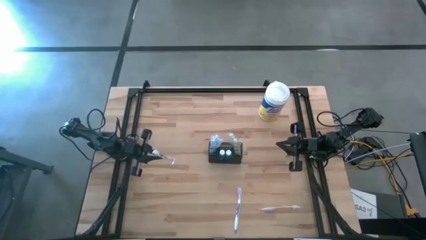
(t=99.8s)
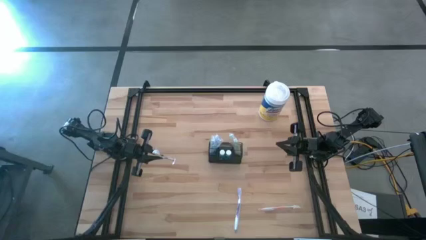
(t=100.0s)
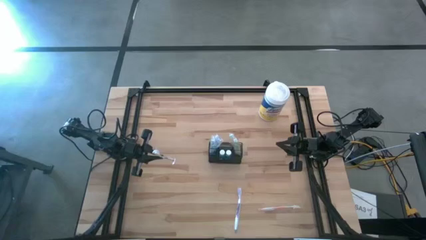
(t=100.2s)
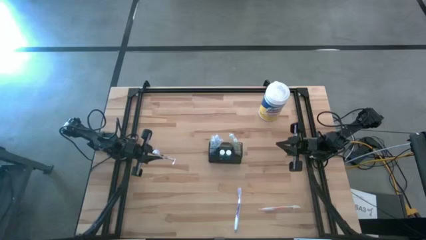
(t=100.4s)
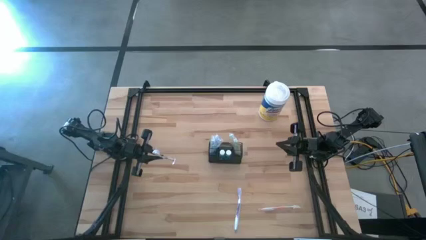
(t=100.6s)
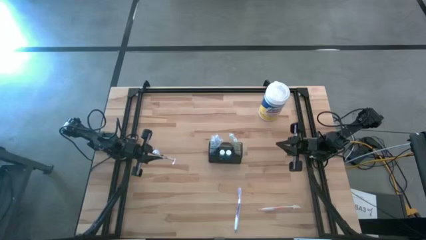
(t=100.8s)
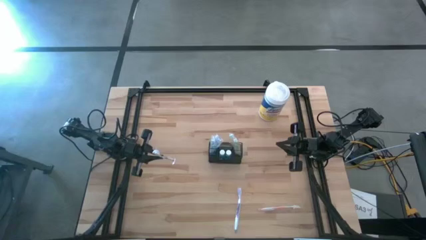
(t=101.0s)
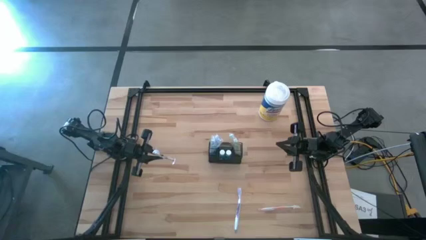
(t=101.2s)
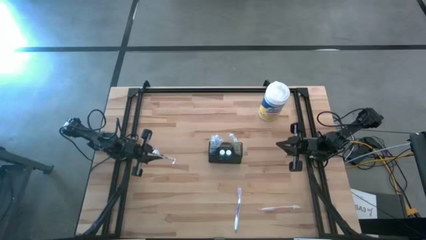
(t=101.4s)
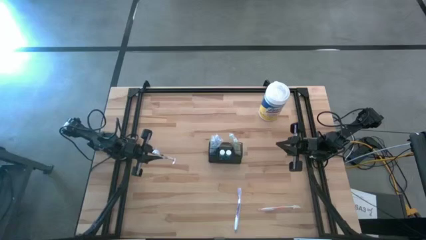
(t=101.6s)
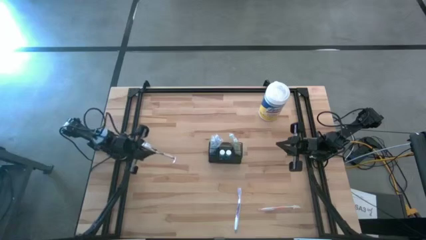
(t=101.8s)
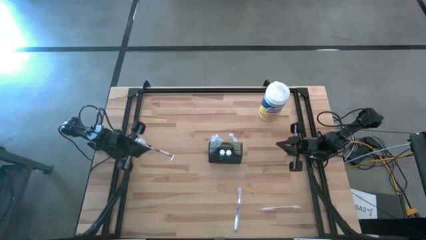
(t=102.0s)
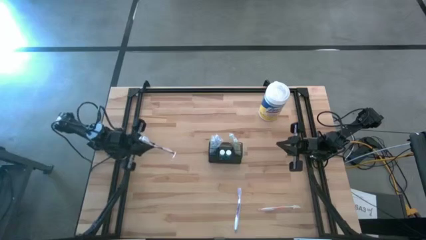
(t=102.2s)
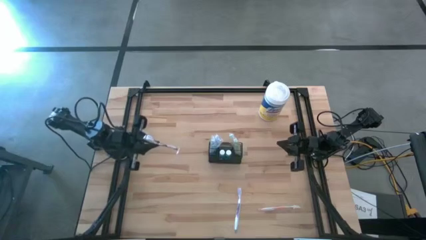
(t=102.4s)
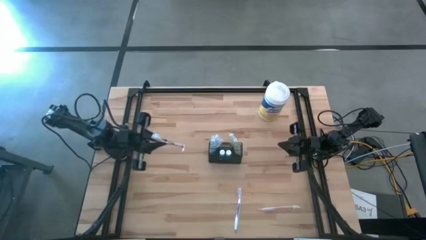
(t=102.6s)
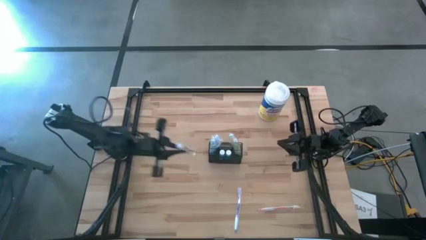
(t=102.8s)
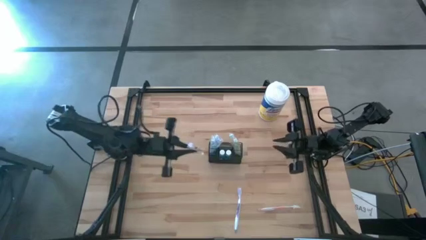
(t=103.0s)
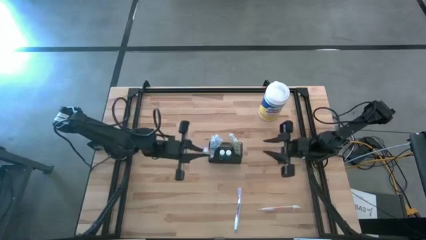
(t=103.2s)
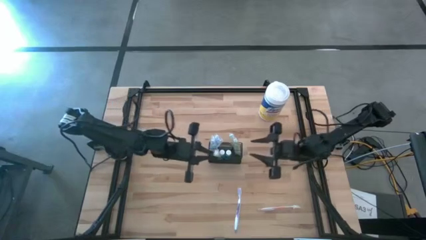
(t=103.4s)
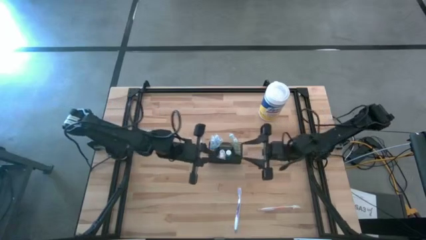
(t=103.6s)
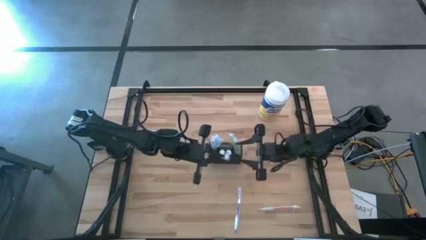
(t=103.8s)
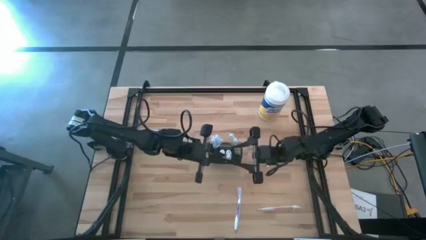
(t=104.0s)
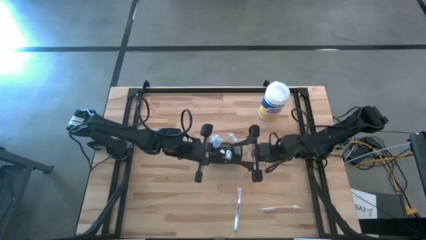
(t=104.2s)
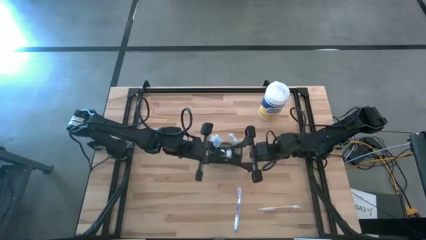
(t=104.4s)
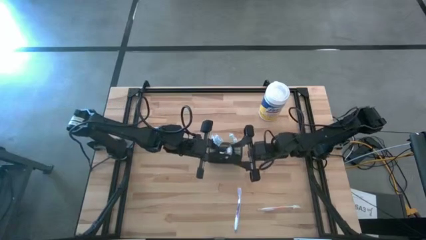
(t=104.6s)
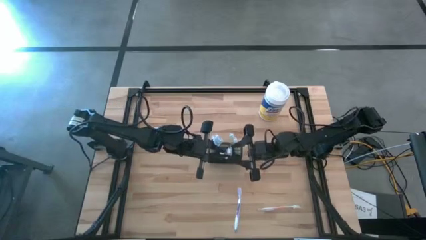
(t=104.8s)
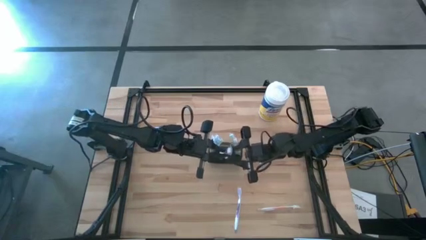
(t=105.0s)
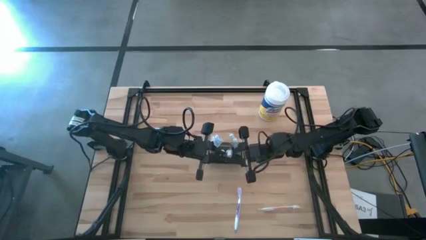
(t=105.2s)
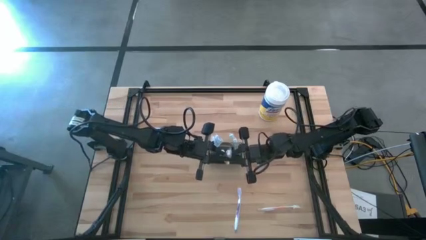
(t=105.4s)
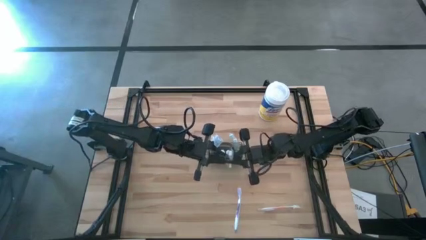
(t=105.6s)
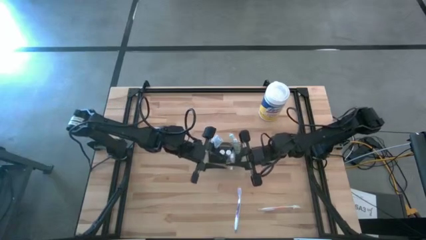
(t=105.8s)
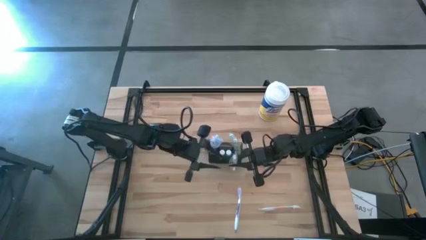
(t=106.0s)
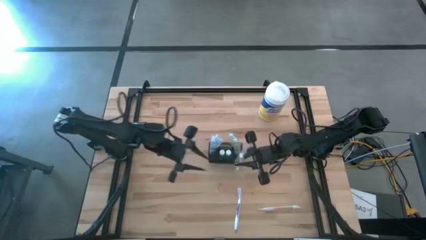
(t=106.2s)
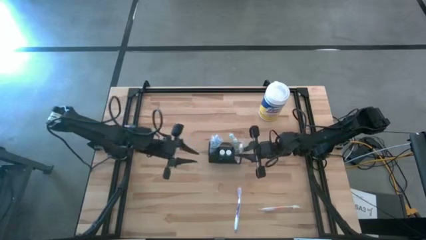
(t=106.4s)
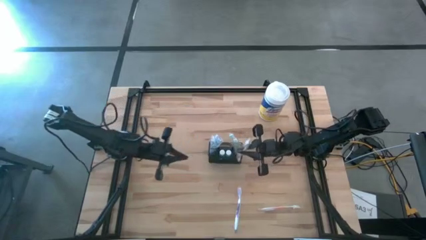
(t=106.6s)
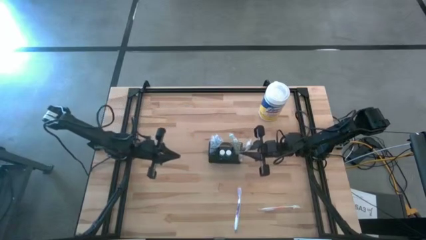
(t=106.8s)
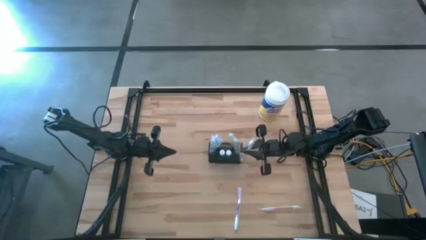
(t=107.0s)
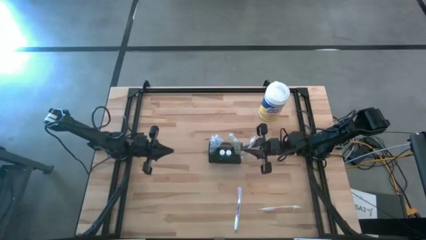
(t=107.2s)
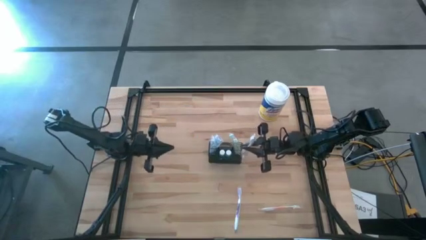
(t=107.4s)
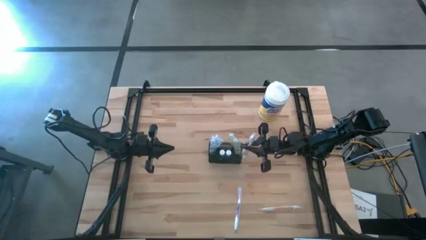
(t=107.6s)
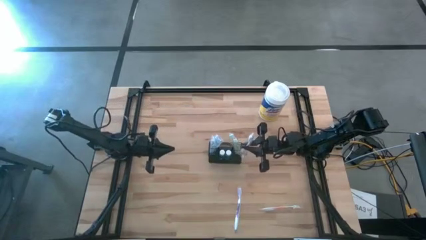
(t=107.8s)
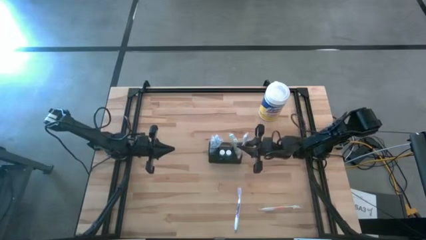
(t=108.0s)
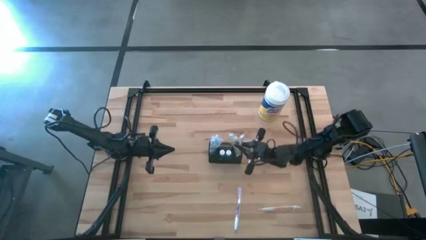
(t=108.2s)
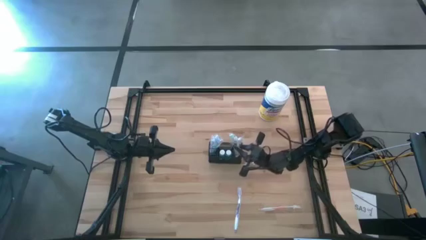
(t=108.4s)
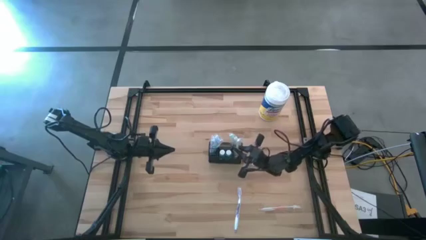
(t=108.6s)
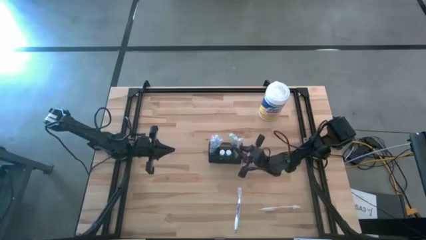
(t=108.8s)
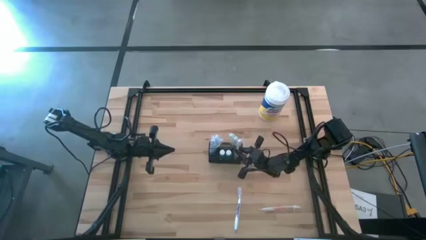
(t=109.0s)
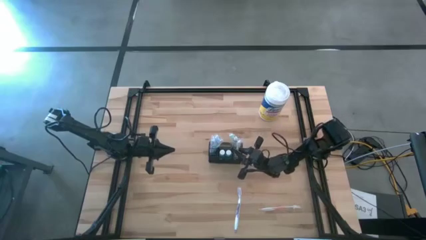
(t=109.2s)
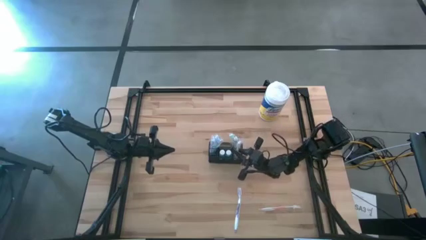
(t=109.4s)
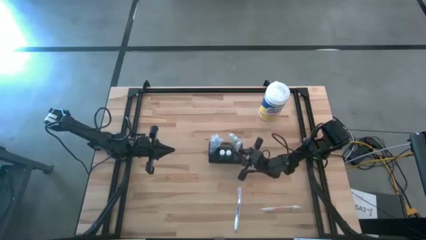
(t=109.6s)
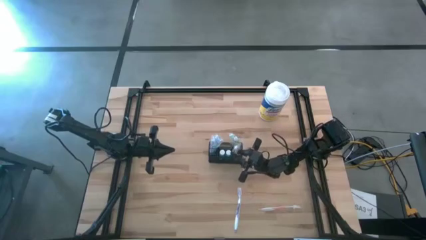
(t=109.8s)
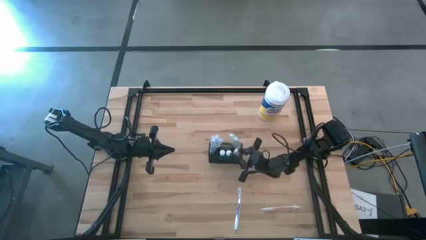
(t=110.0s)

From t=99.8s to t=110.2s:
Task: Pick & Place toothbrushing station
Put the purple toothbrush into the wire organizer
